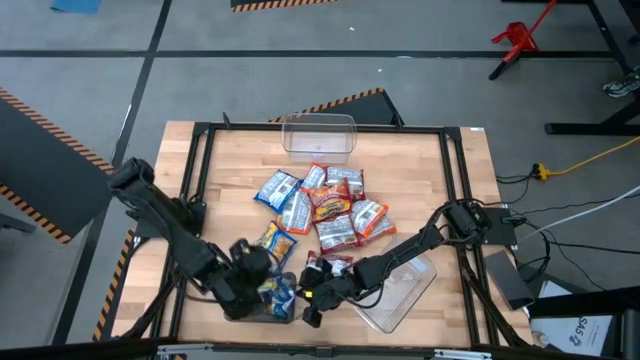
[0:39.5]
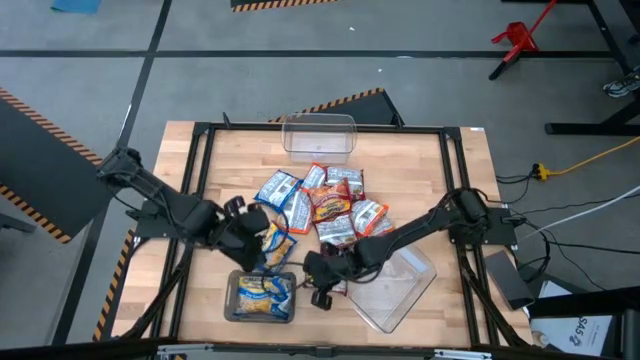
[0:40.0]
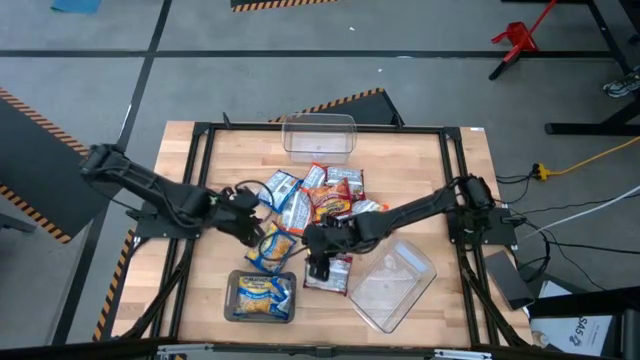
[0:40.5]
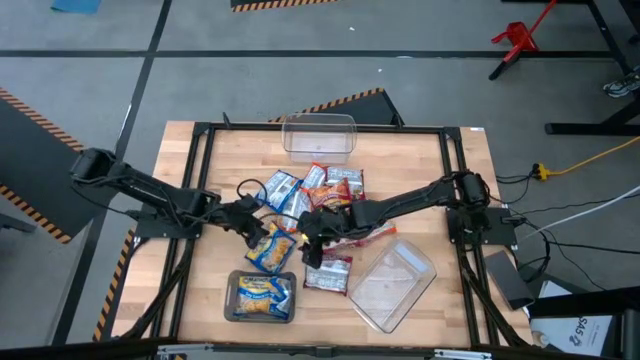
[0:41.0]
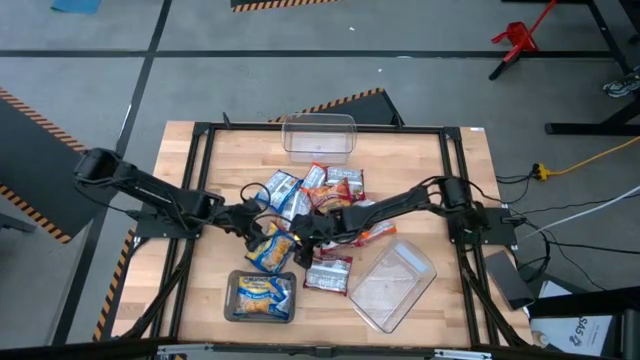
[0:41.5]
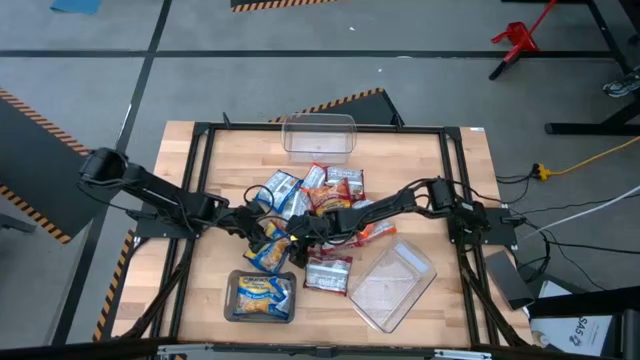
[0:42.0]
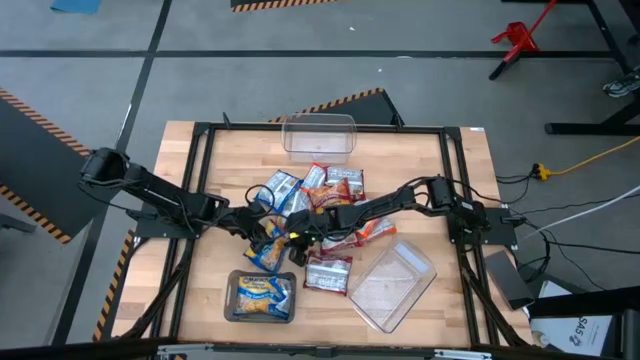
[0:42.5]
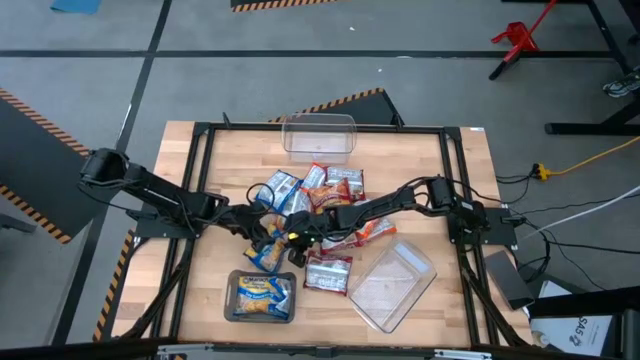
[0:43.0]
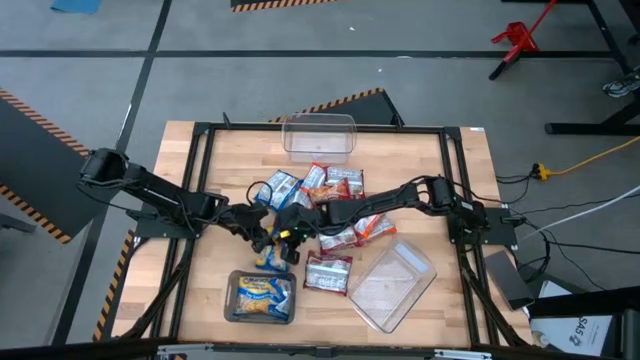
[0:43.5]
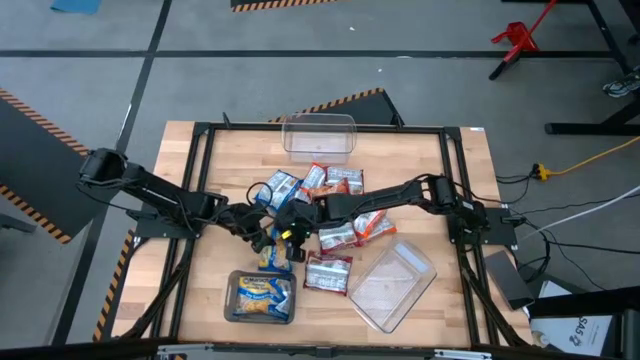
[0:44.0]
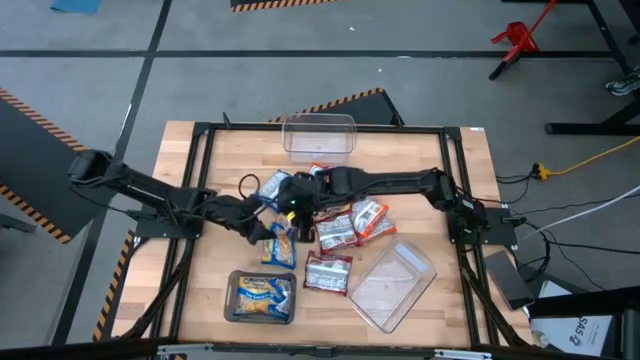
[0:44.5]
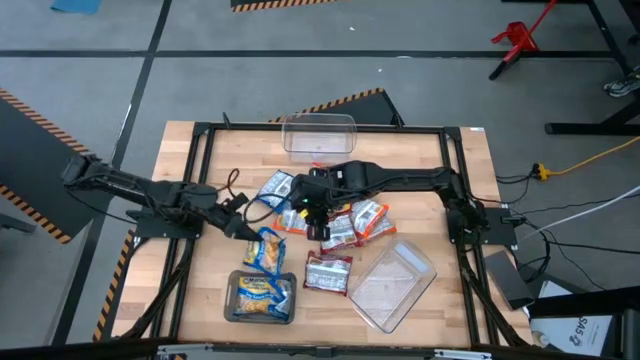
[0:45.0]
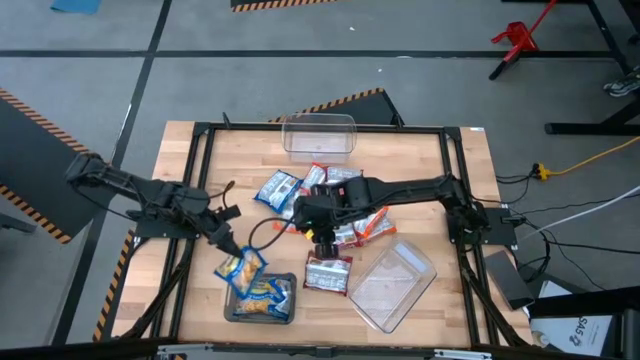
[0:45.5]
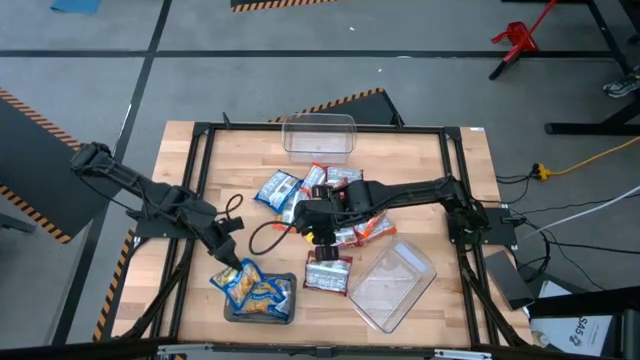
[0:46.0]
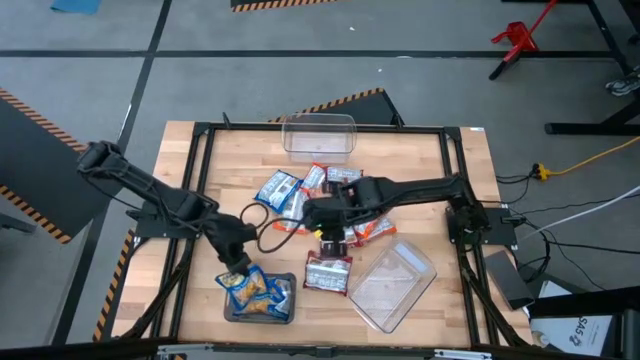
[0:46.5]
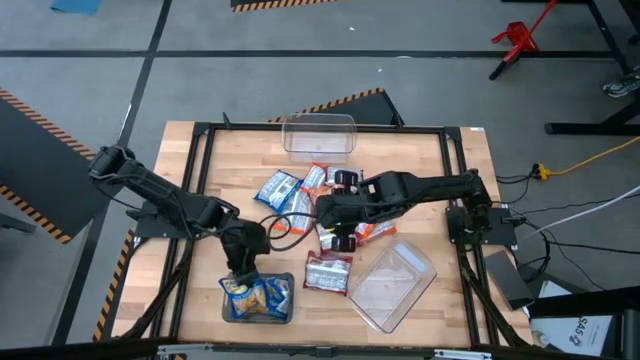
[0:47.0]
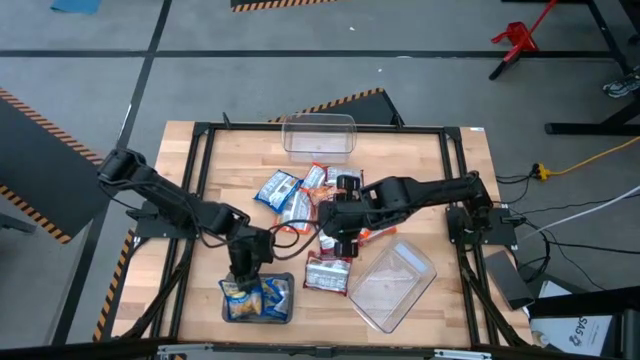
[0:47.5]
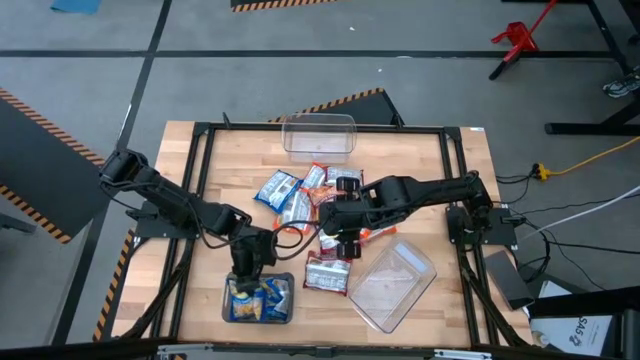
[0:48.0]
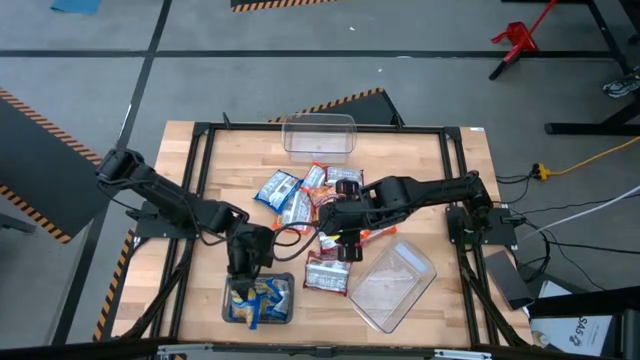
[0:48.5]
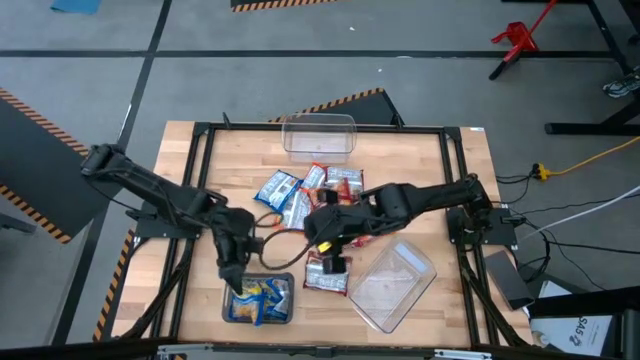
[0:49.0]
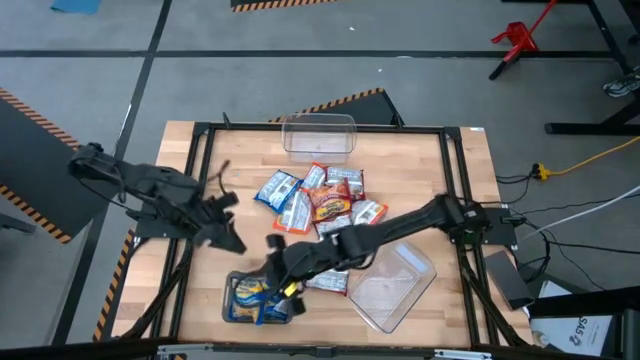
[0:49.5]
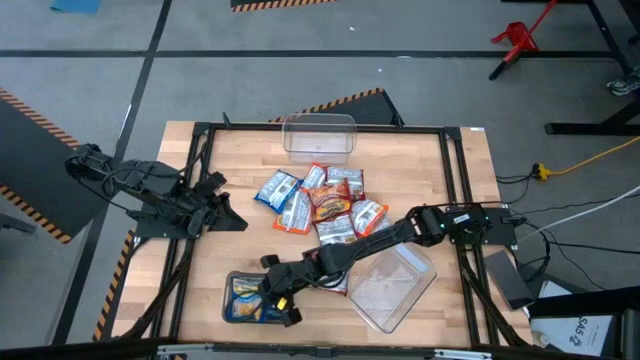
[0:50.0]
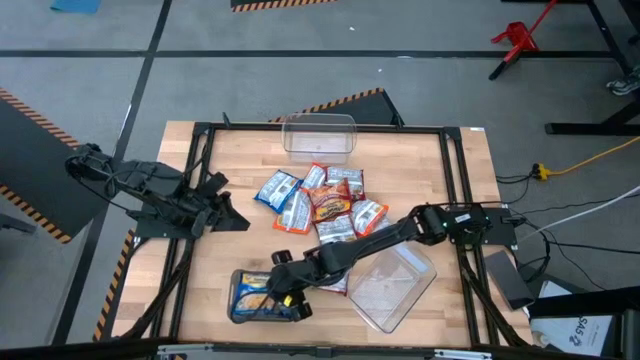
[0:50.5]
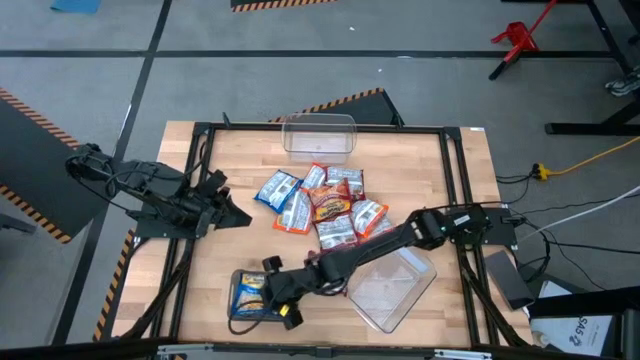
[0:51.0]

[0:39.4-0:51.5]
Task: Sort Maruchan noodles
Put the blue noodle pack into the black bin

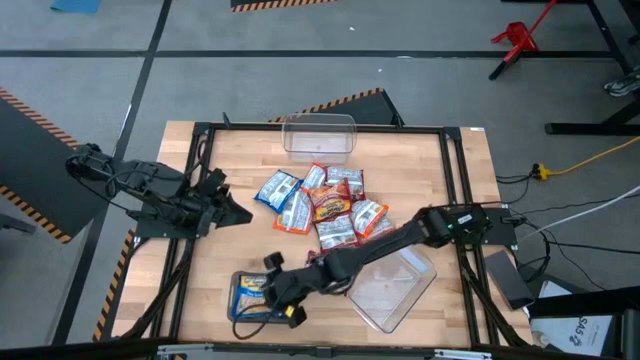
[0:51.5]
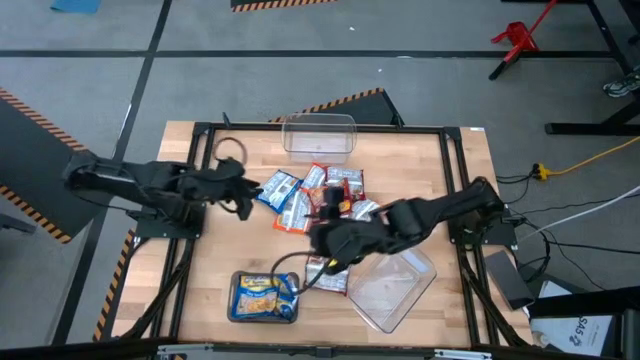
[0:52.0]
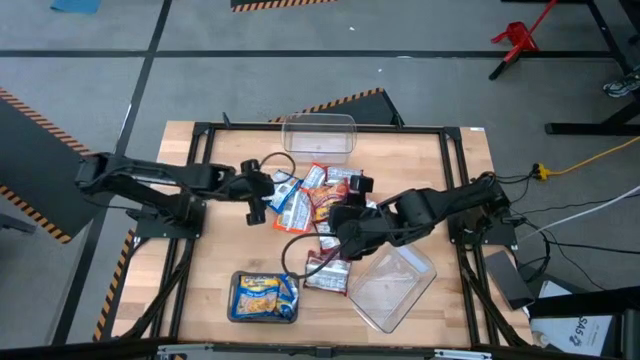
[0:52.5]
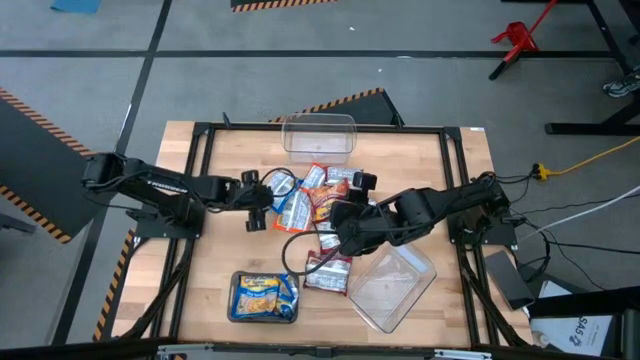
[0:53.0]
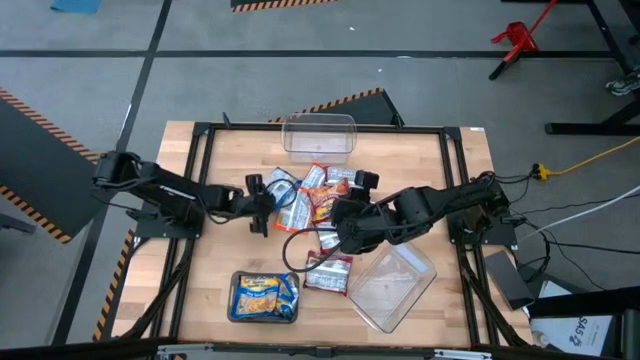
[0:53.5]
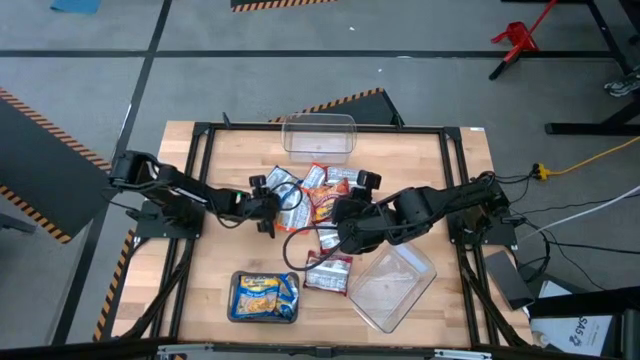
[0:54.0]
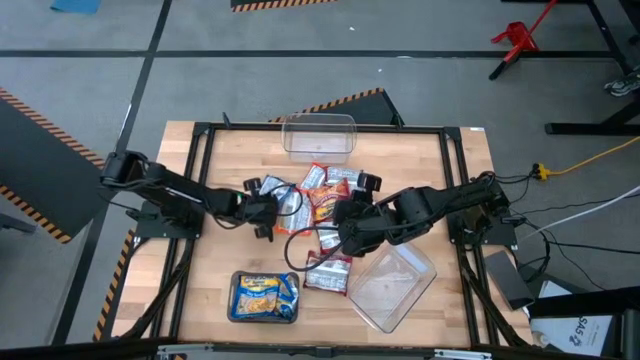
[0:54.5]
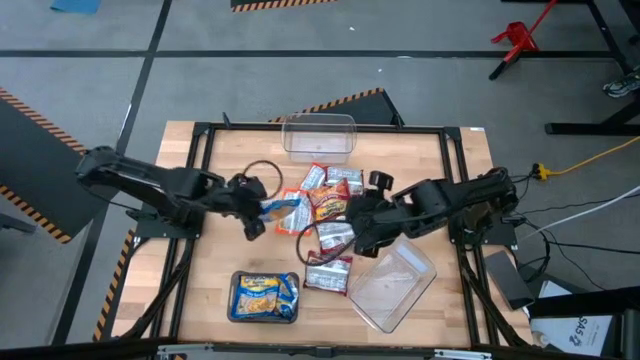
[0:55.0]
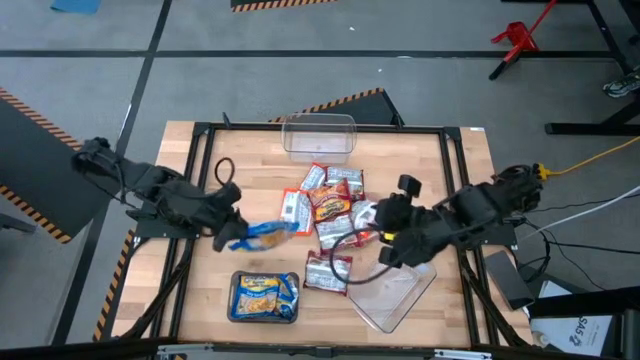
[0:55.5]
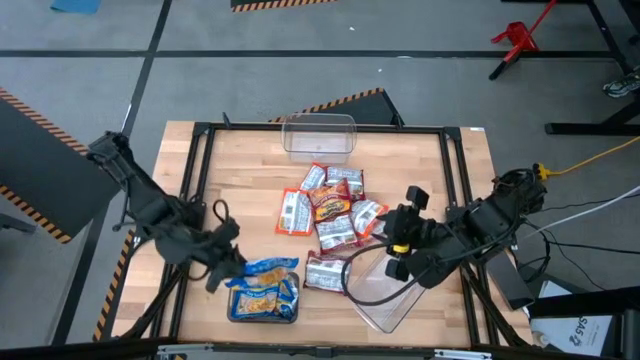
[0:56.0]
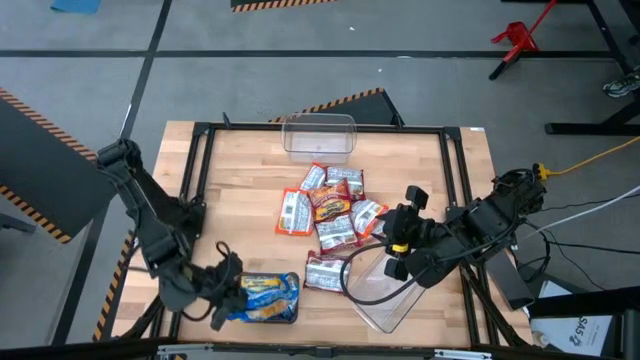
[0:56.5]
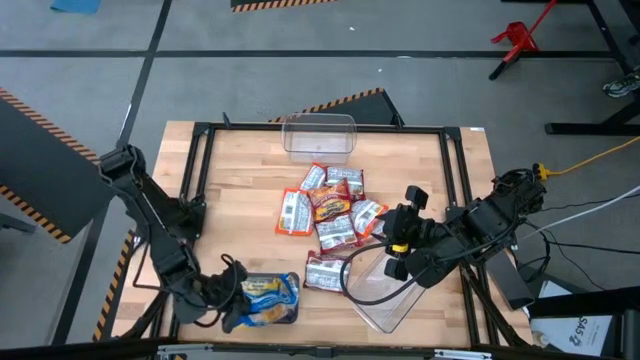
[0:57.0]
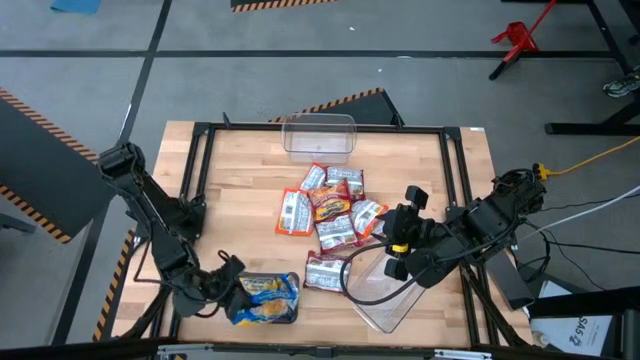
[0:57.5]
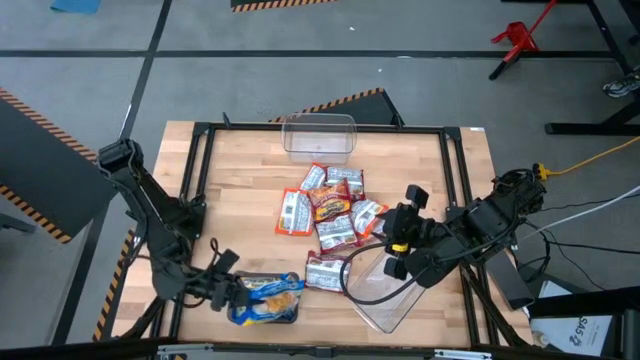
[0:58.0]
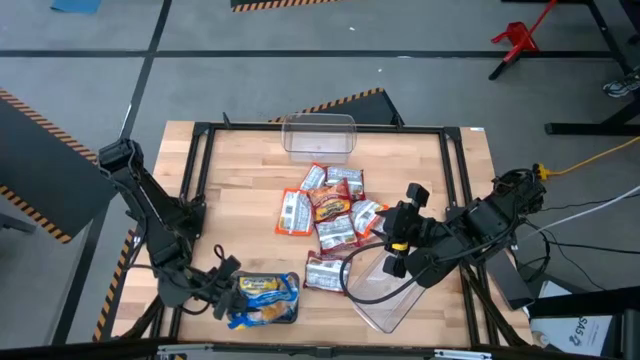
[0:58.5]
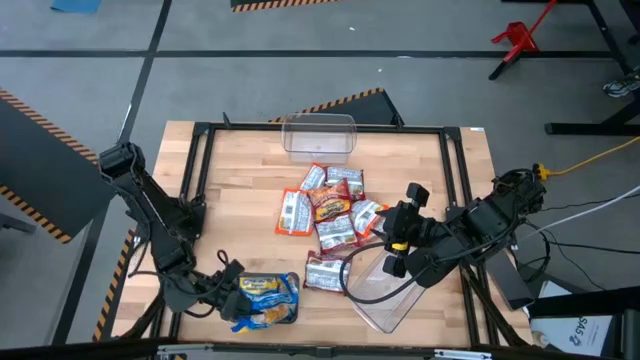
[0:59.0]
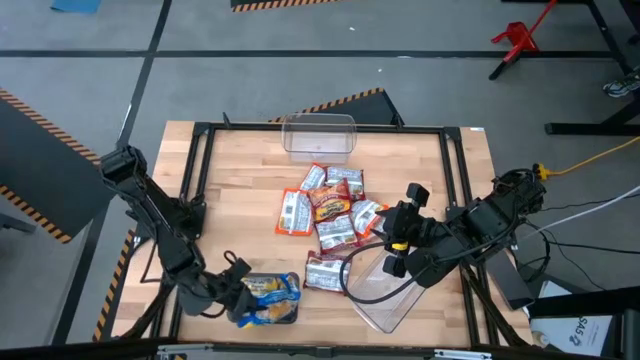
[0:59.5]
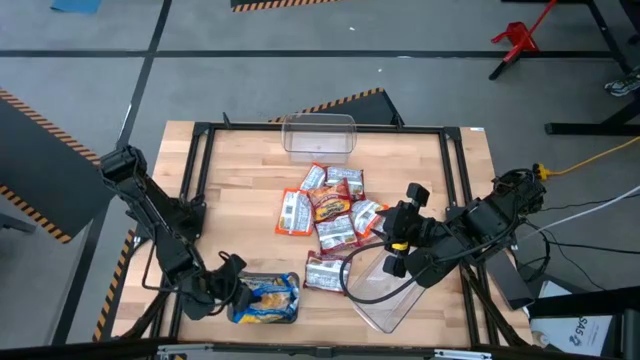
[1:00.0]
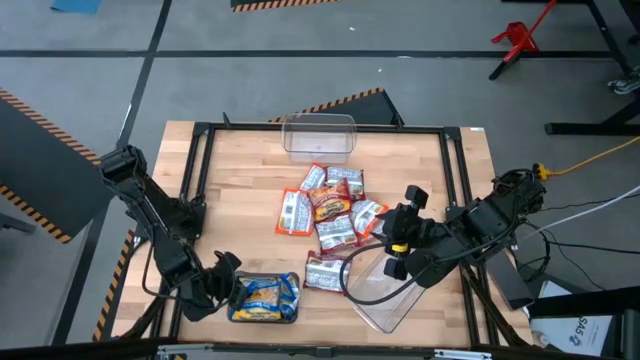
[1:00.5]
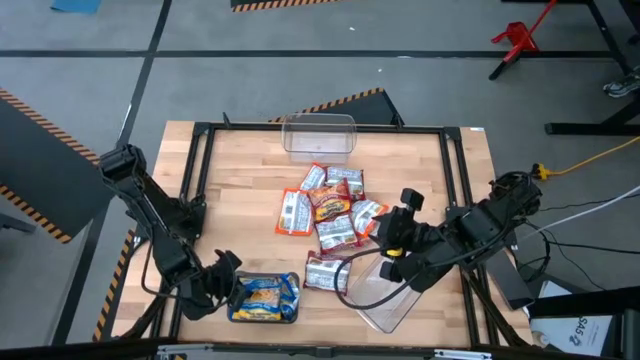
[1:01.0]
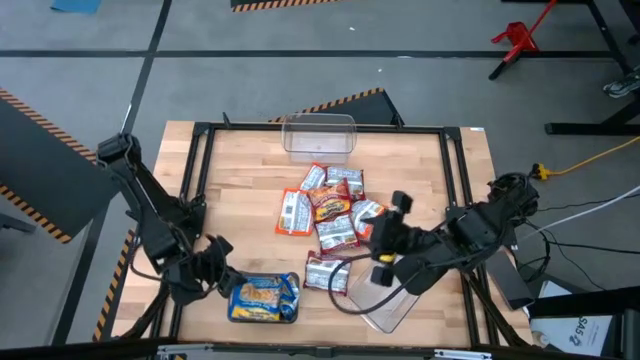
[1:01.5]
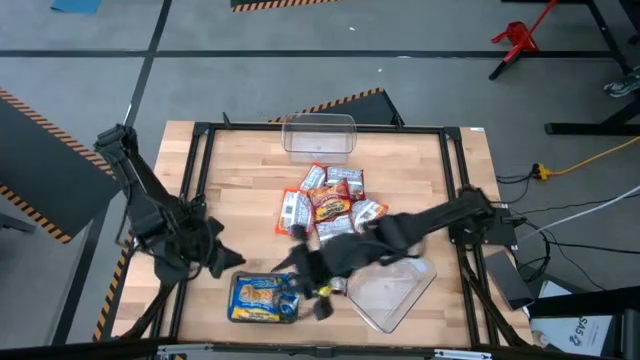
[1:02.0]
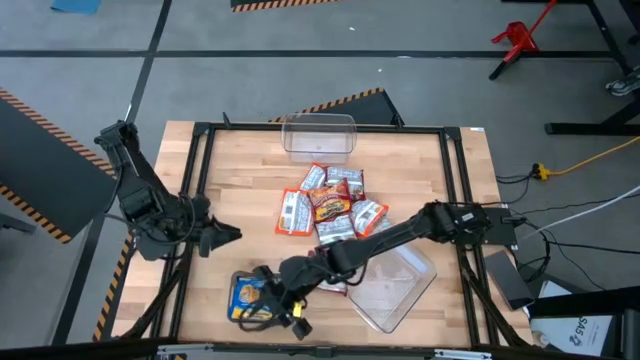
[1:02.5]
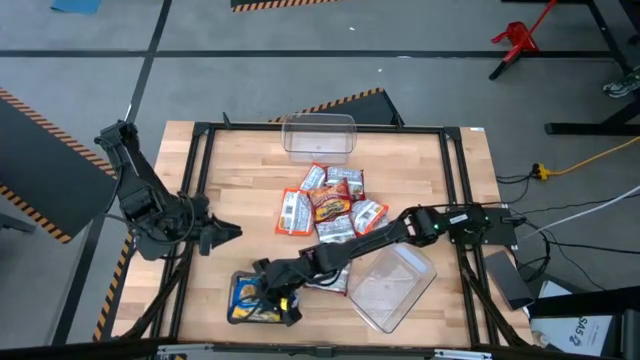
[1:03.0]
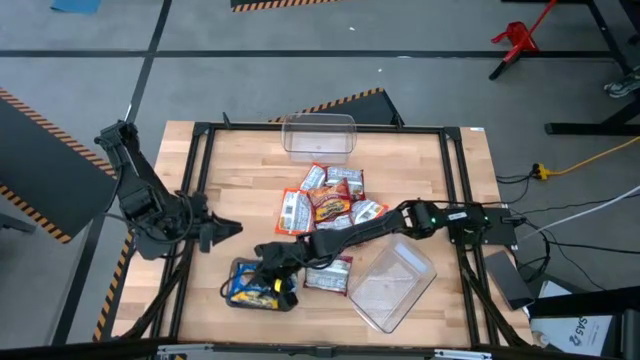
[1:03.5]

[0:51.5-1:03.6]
Put the blue noodle pack into the black bin
